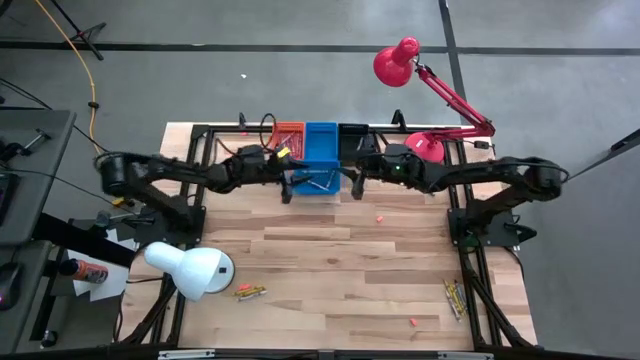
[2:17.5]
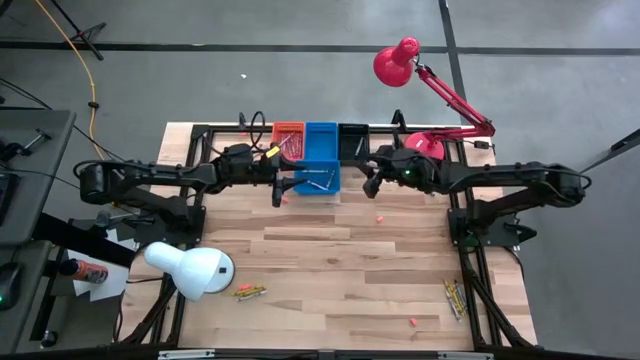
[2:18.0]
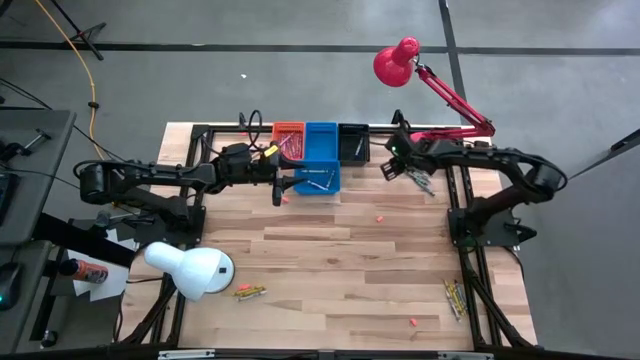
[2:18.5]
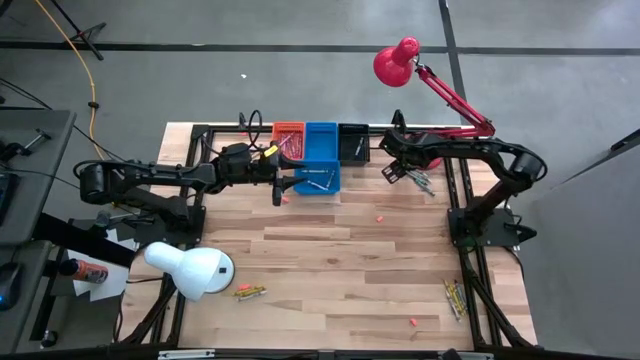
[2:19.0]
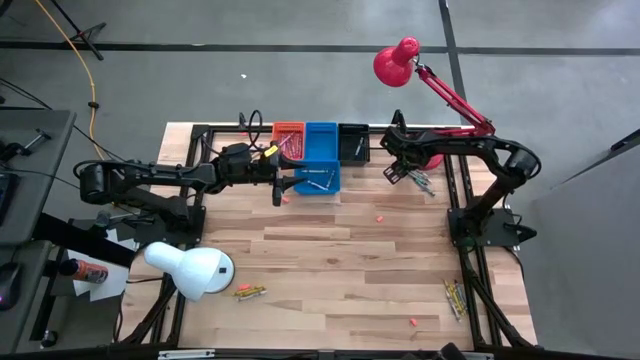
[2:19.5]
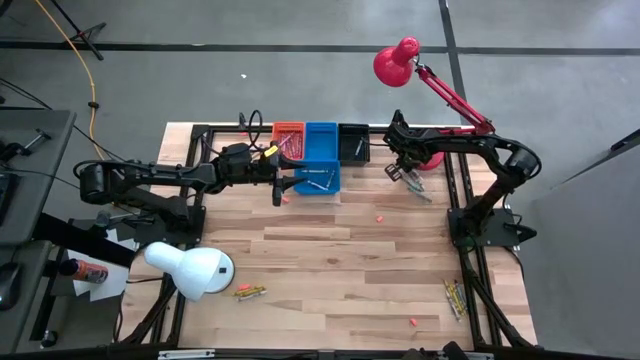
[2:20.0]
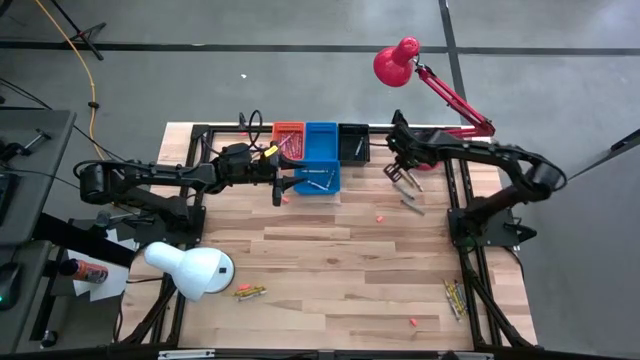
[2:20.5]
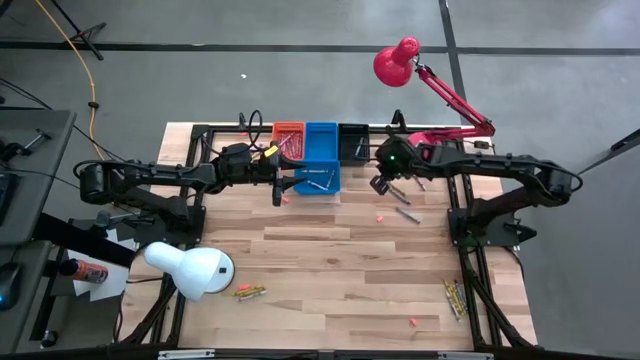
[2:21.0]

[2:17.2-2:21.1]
Task: Sort crayons
Put the white crayon into the bottom blue bin

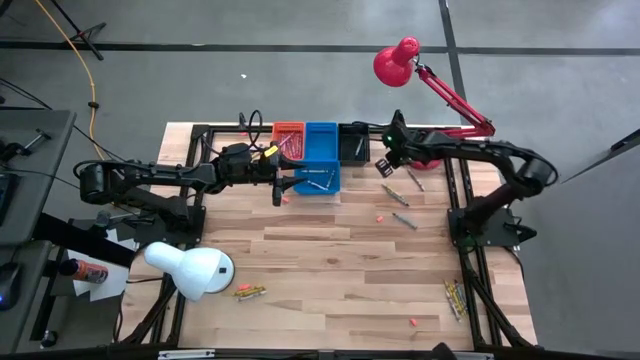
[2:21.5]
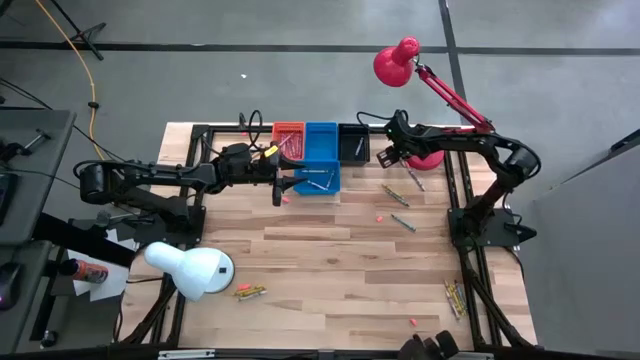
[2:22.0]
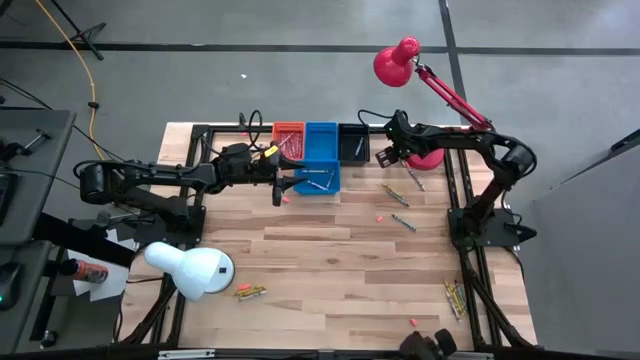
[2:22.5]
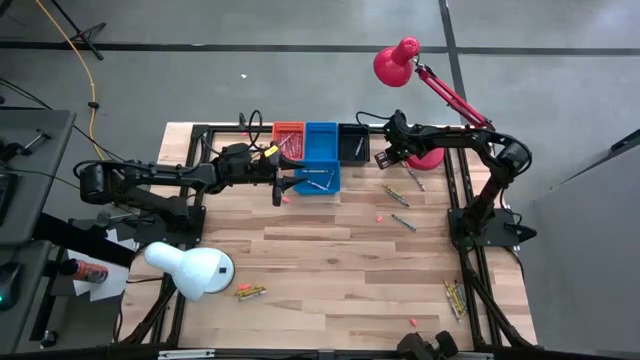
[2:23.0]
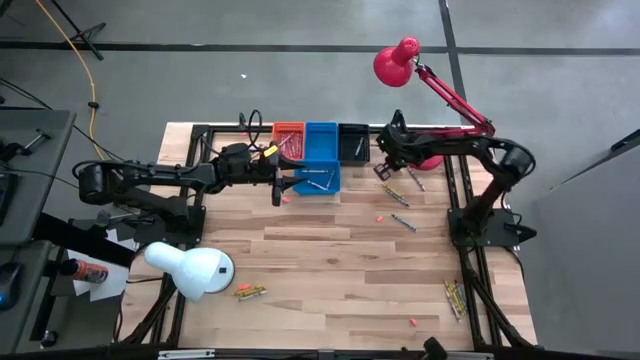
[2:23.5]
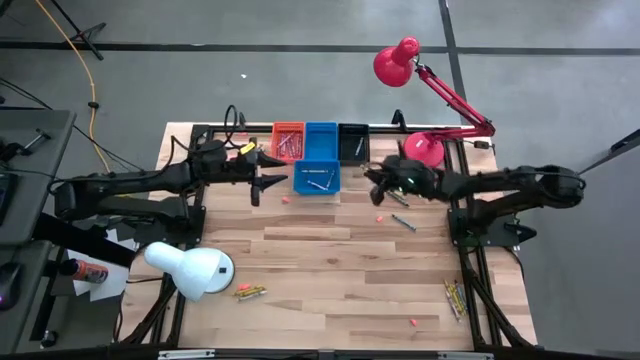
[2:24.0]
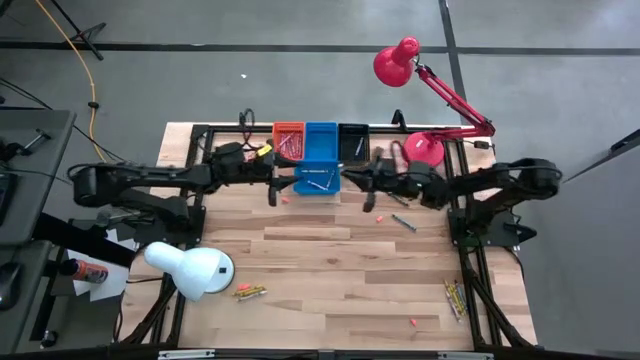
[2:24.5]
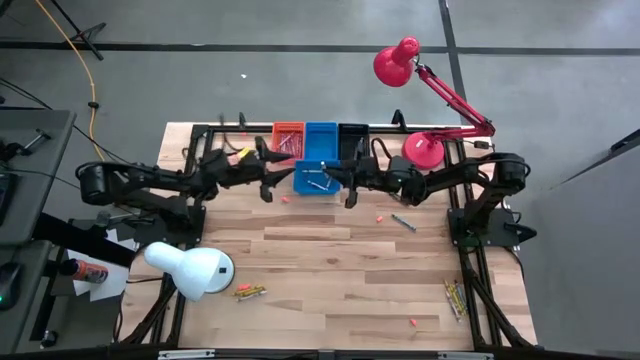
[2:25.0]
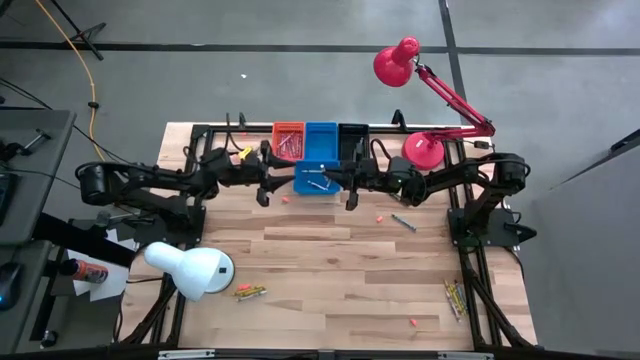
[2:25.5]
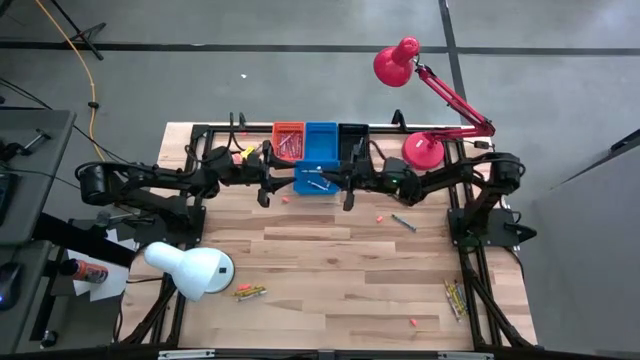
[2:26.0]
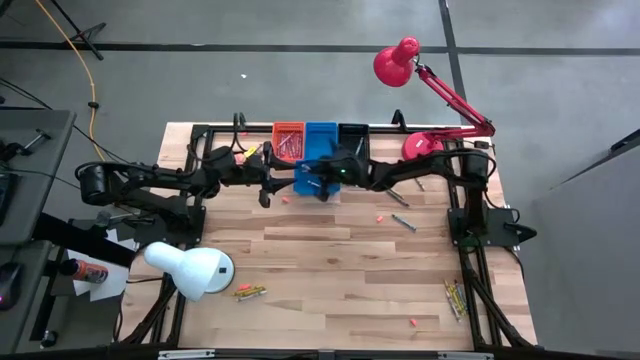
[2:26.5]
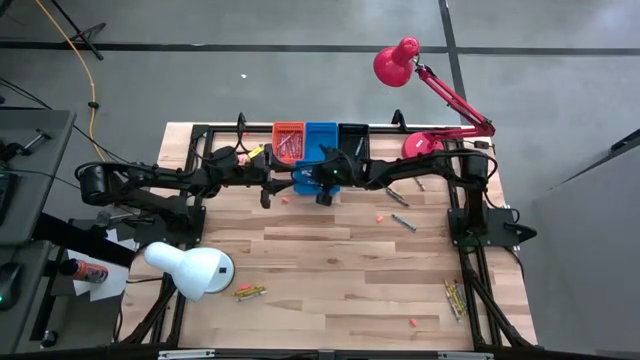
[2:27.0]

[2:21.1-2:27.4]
Put the white crayon into the bottom blue bin

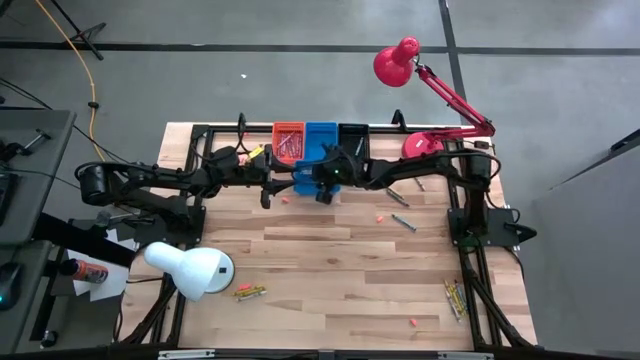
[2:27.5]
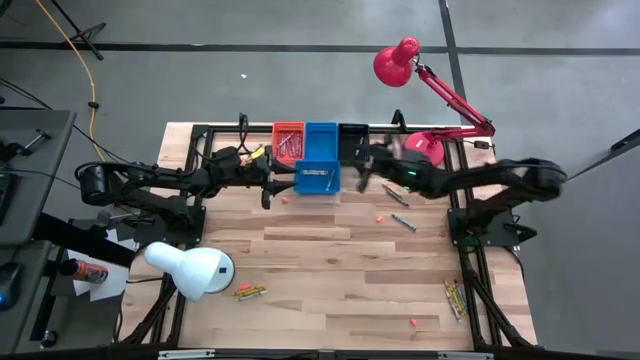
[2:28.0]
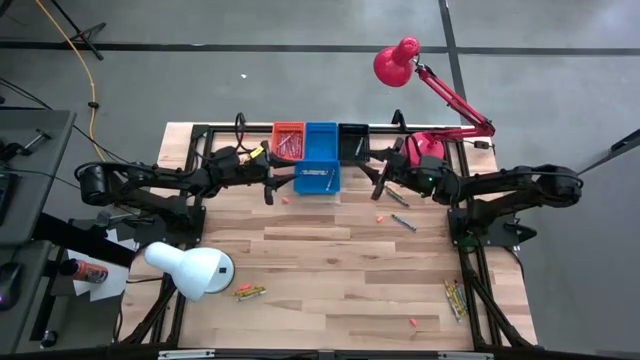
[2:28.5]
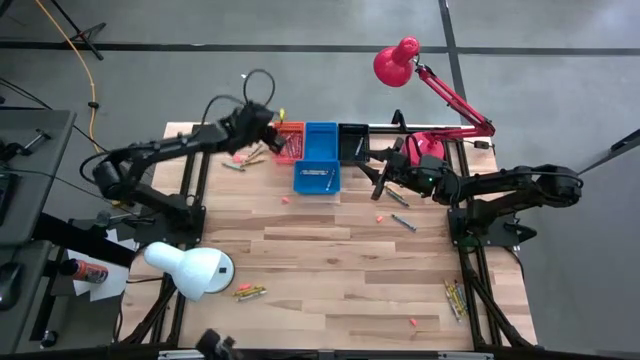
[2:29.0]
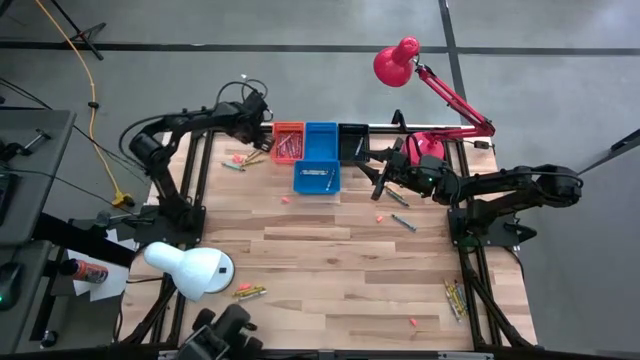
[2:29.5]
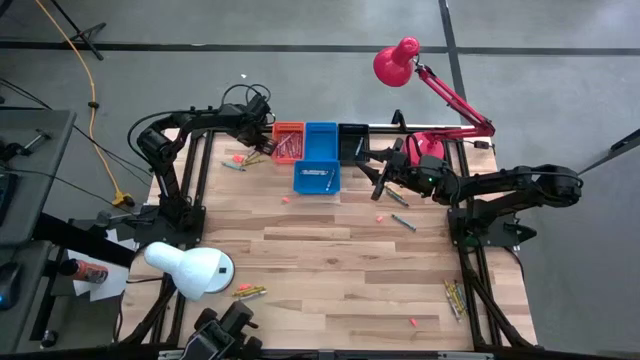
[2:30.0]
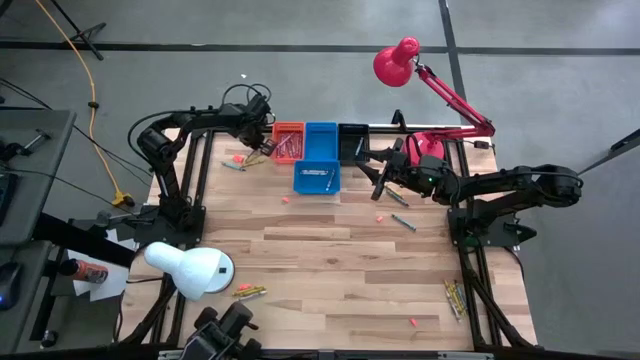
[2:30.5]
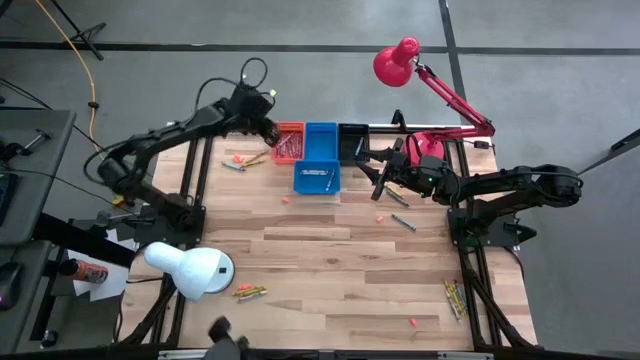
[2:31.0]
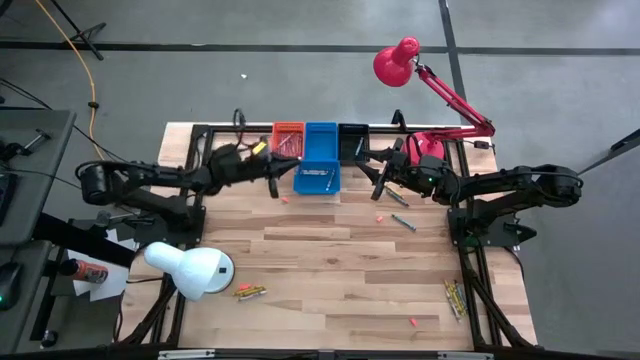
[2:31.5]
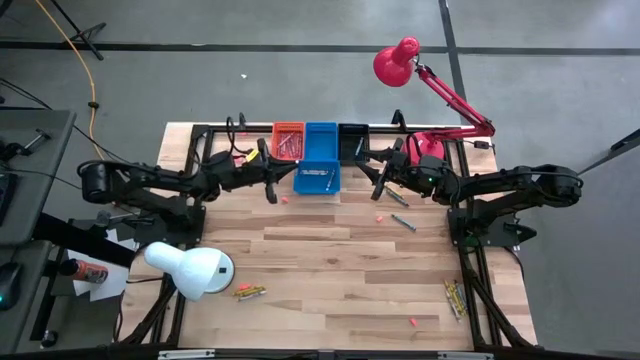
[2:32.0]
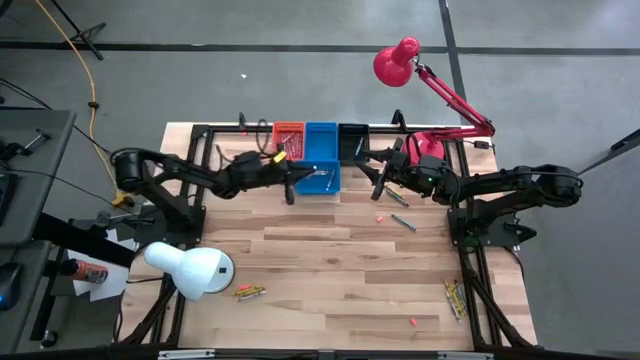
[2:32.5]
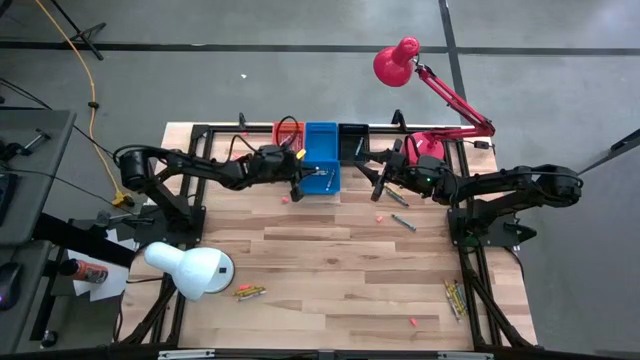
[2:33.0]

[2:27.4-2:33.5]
Put the white crayon into the bottom blue bin

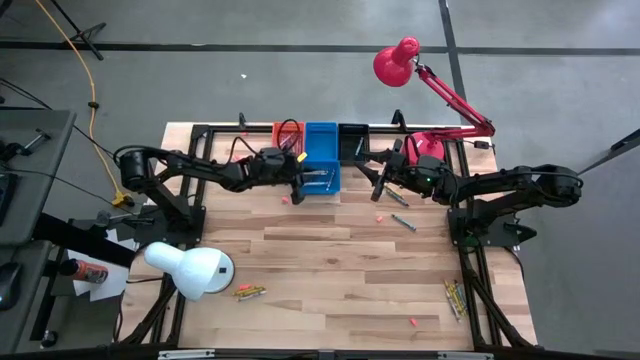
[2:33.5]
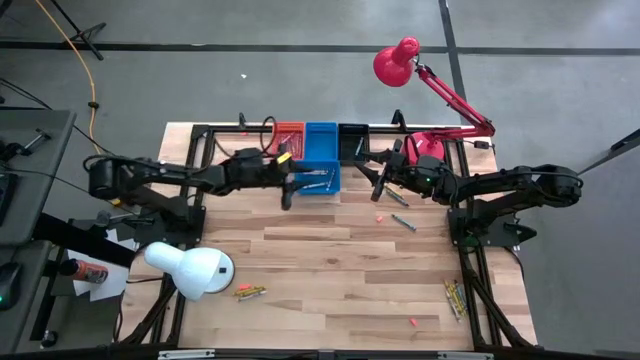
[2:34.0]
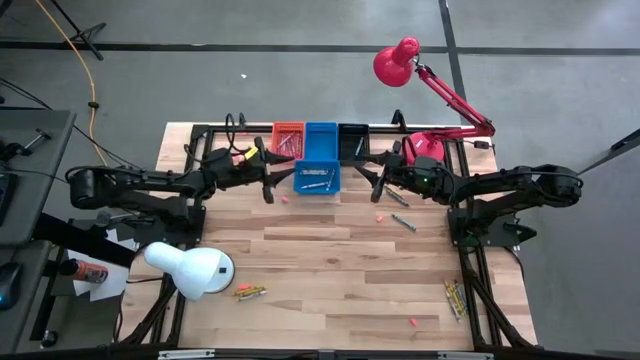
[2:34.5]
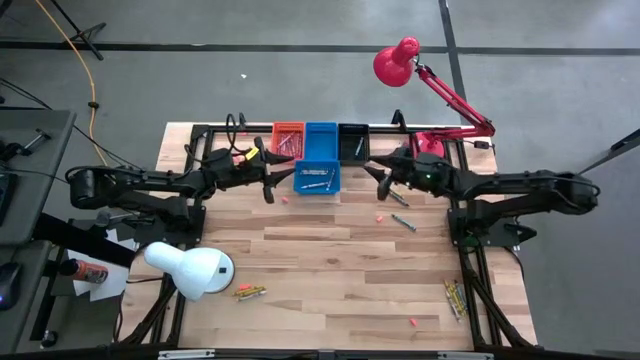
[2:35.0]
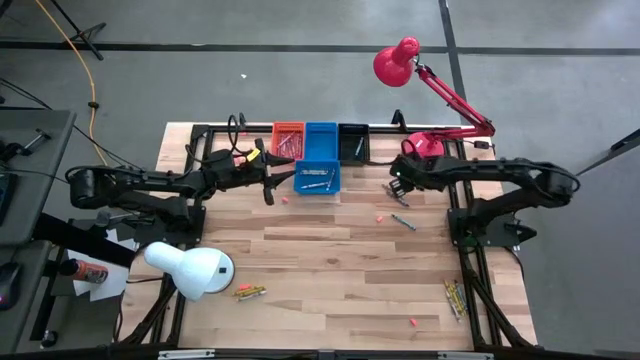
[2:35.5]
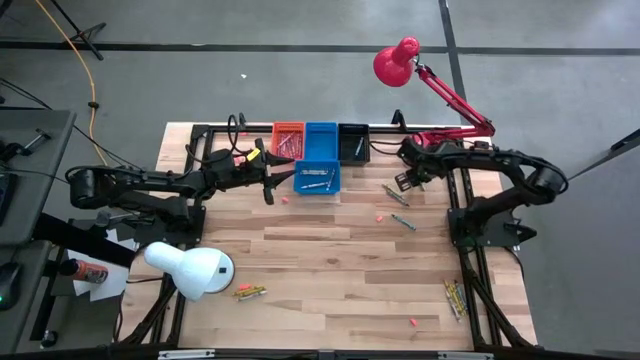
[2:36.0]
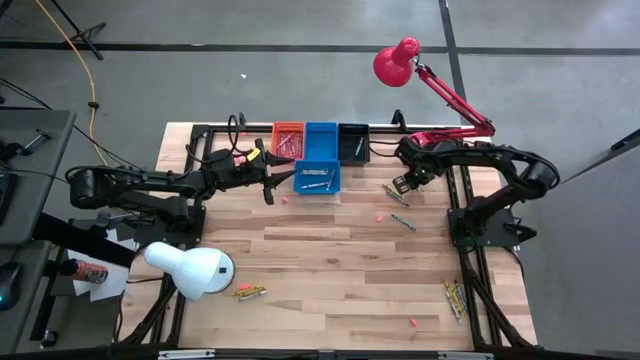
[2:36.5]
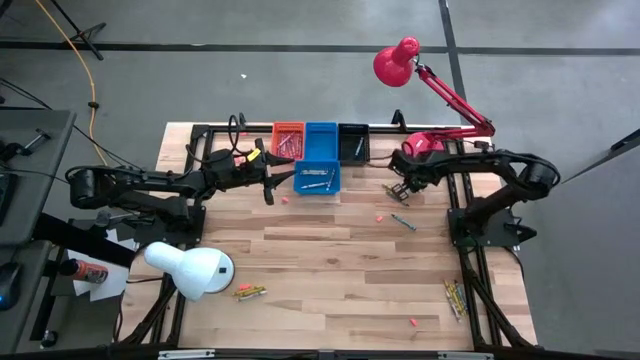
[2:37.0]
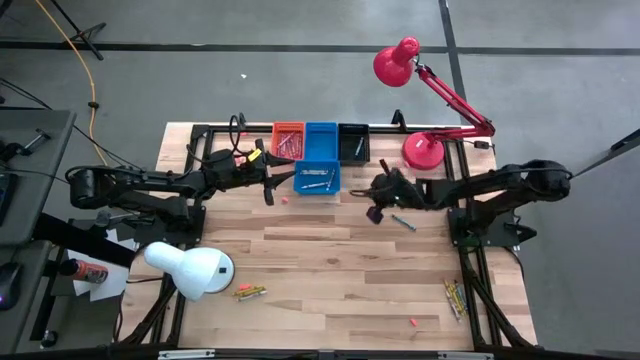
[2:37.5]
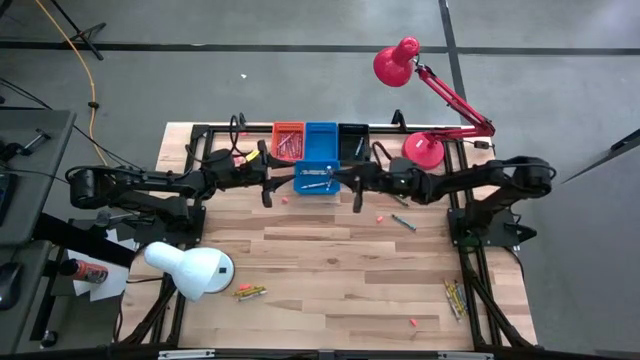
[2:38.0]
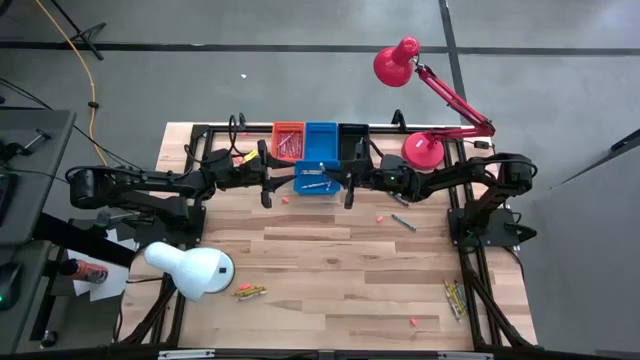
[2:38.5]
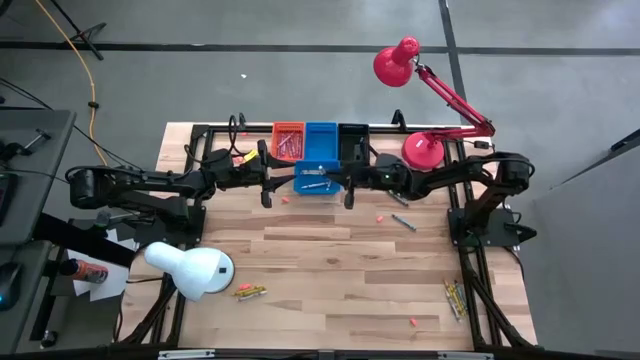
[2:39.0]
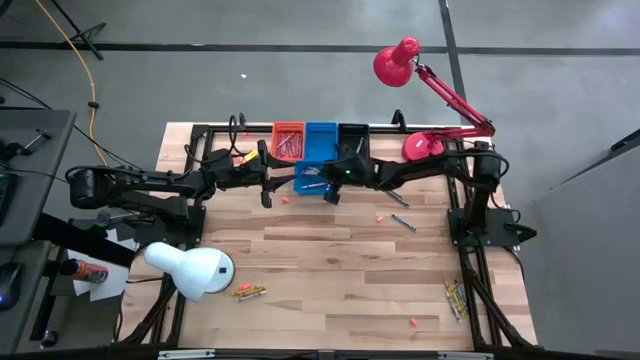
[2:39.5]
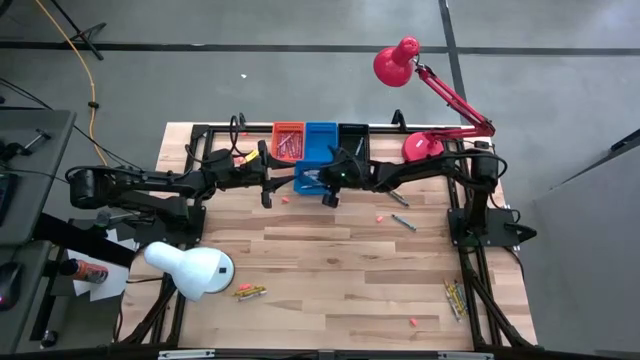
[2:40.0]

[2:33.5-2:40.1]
Put the white crayon into the bottom blue bin
